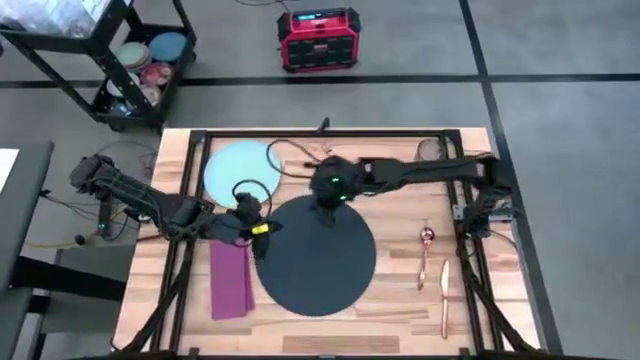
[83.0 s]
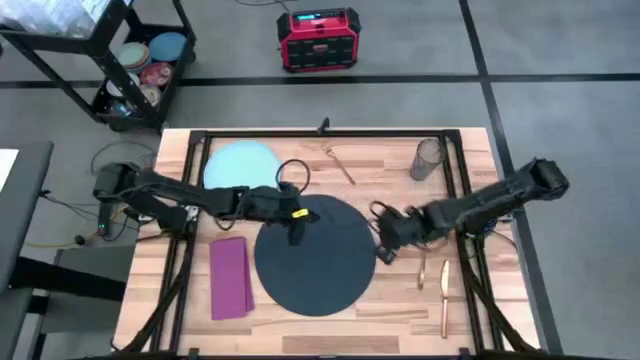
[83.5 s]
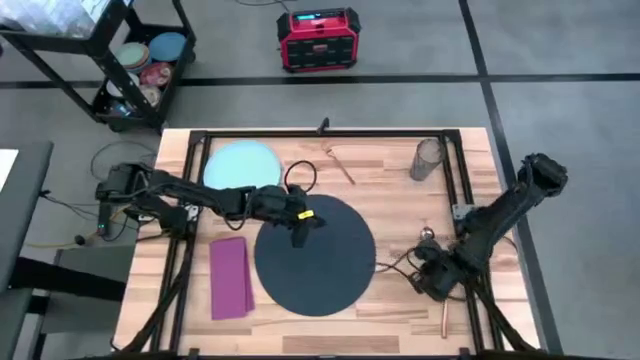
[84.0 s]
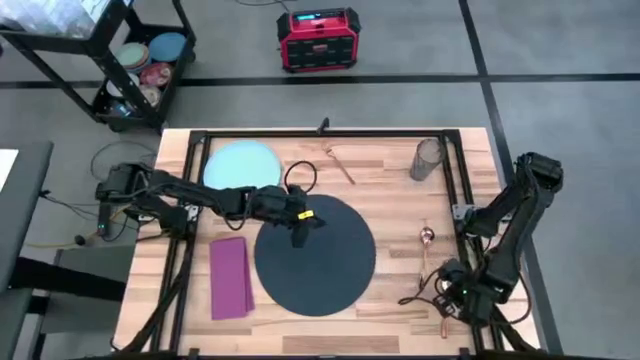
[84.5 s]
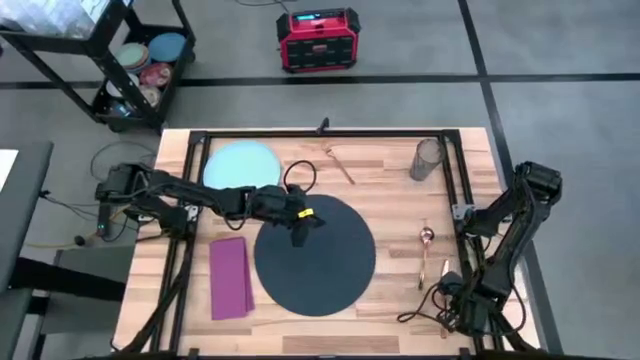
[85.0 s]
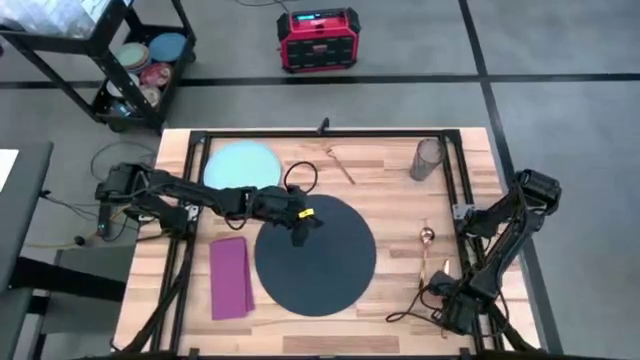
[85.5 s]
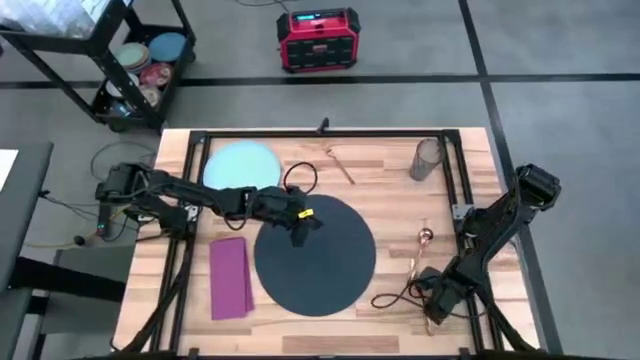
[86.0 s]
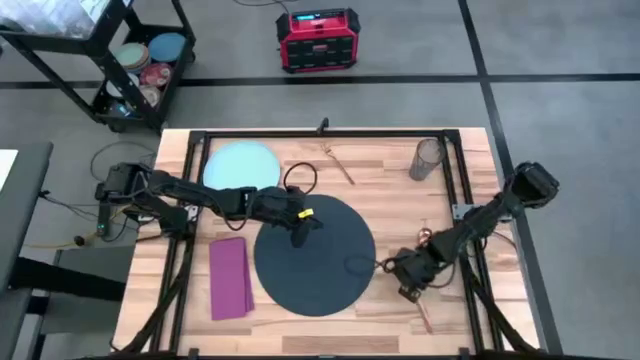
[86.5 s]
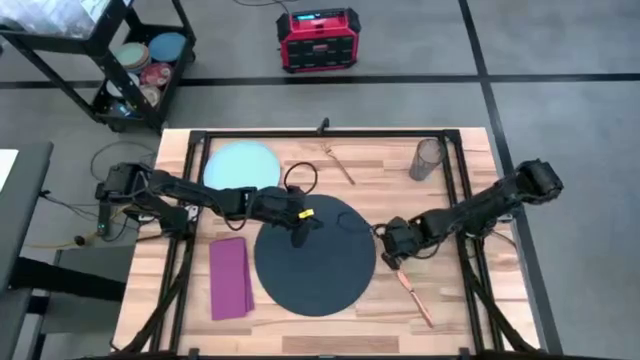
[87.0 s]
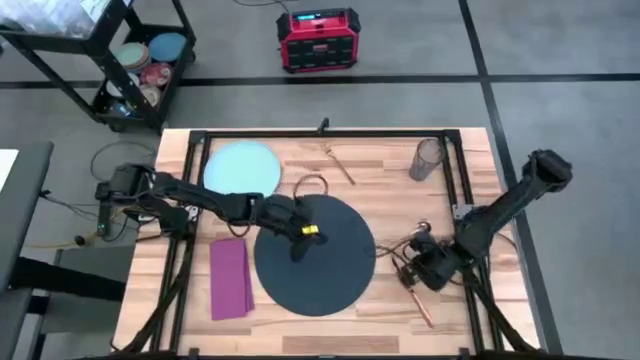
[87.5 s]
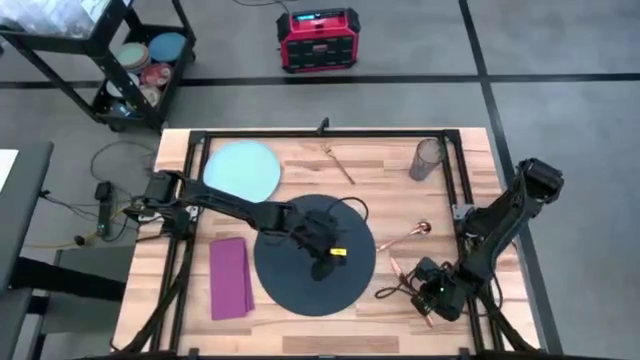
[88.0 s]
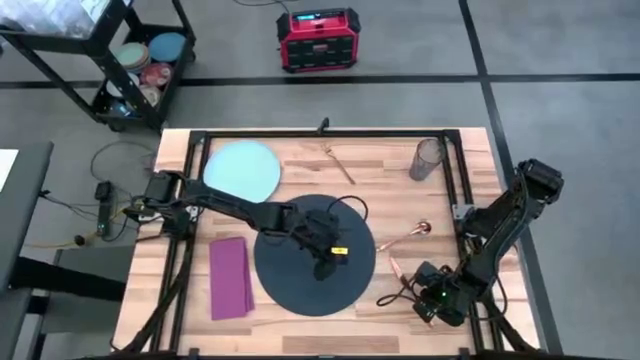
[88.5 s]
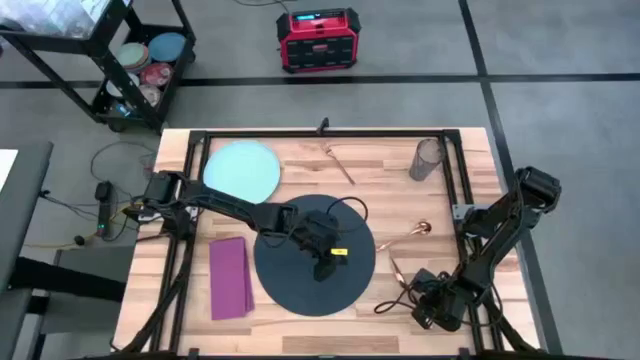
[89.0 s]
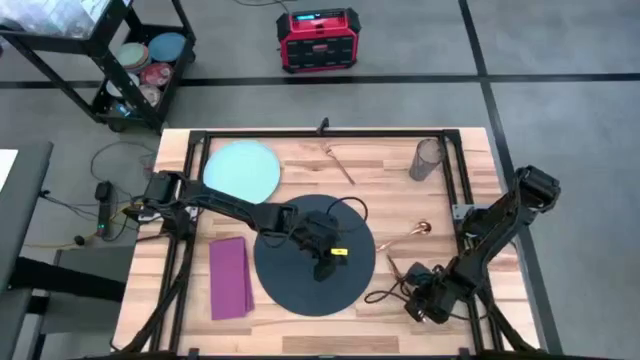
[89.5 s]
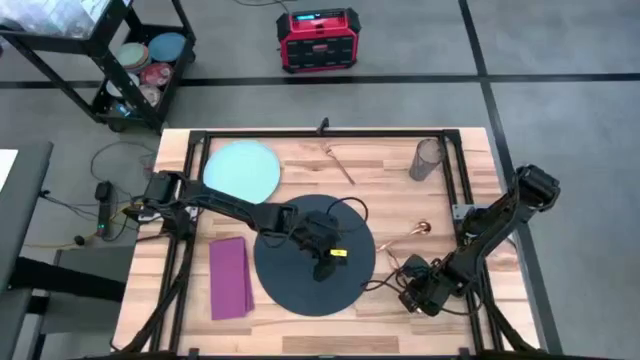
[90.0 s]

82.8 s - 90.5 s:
Task: Set table place
Move the brown table knife to the right of the blue table mat

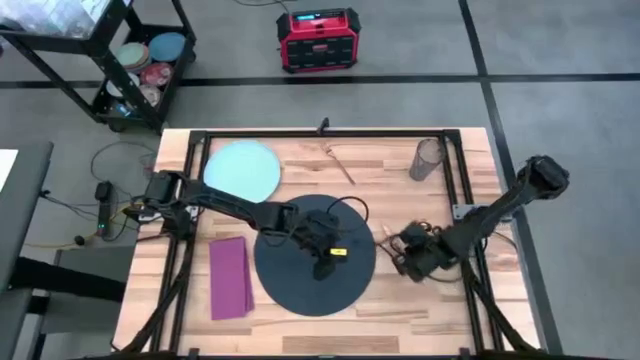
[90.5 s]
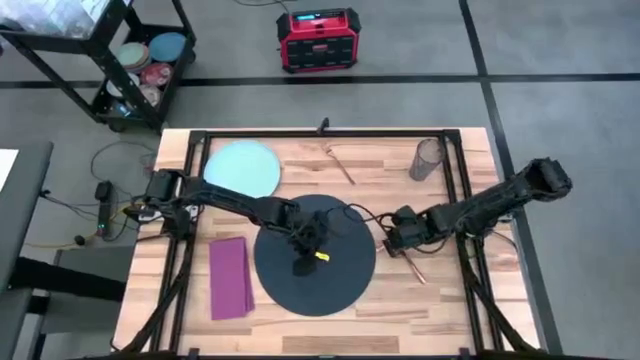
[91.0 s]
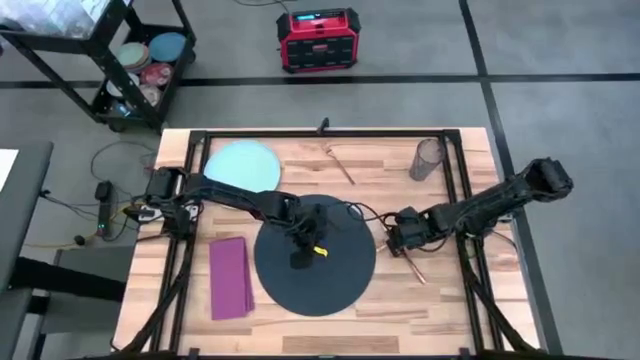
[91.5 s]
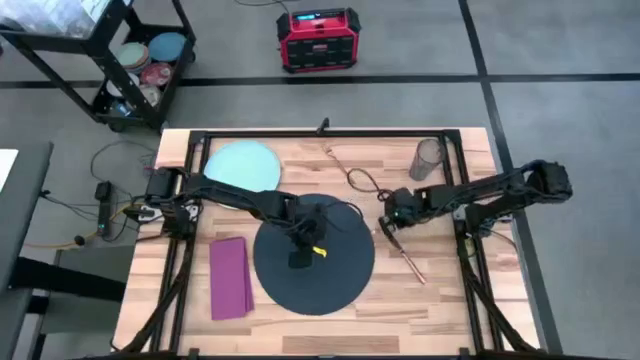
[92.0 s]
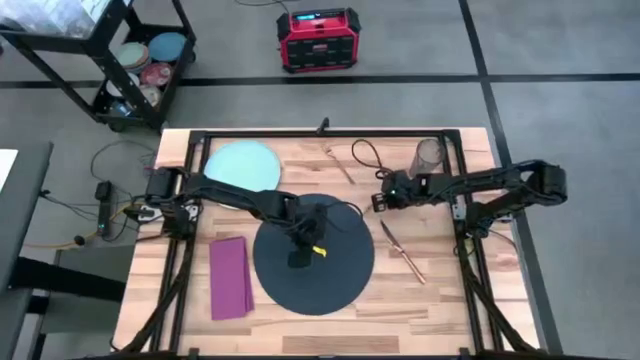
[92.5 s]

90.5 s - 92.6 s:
Move the brown spoon to the top right of the blue table mat

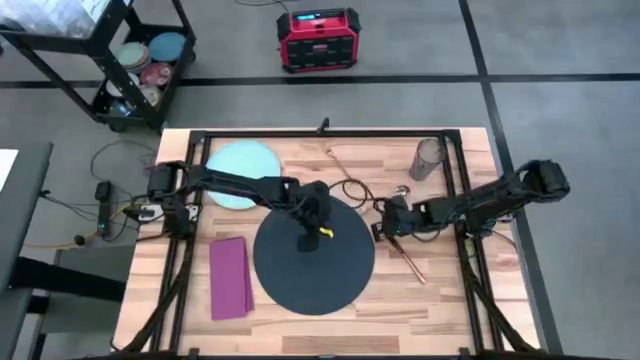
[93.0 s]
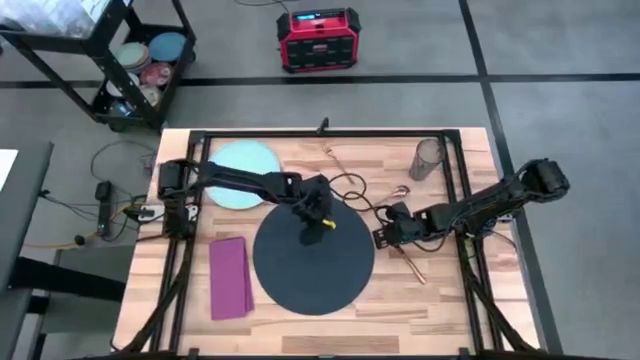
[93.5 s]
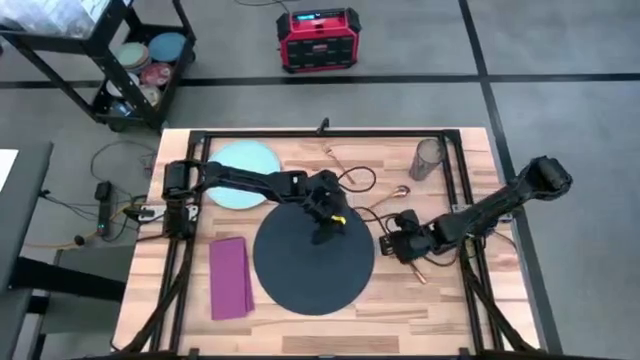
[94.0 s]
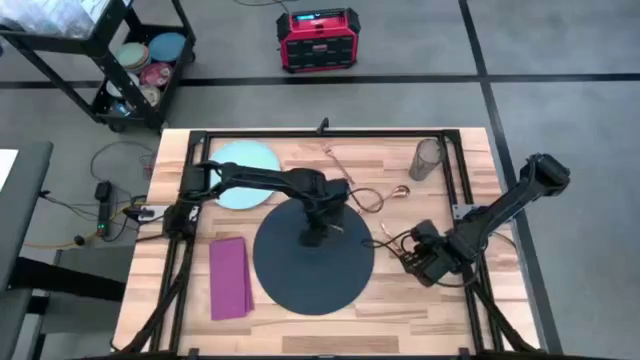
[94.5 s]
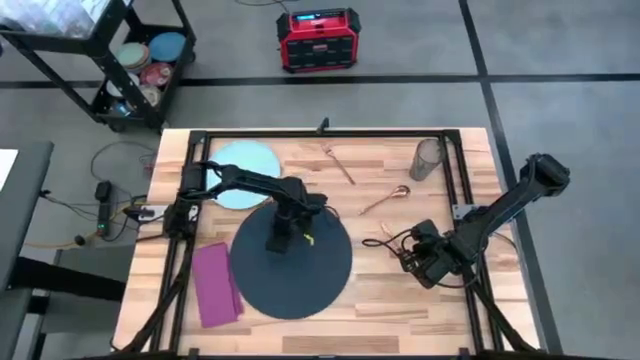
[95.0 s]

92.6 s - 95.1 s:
Adjust the blue table mat on the table

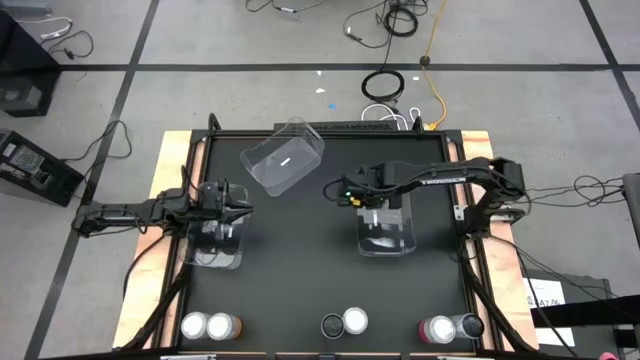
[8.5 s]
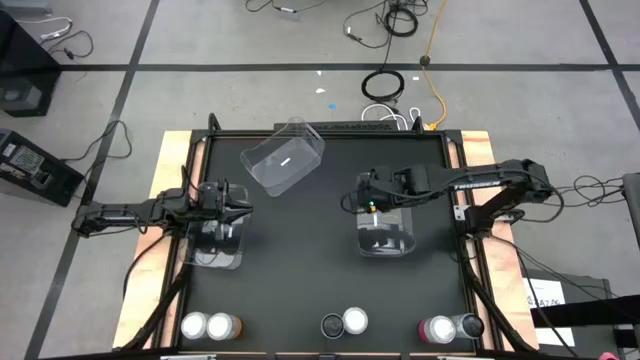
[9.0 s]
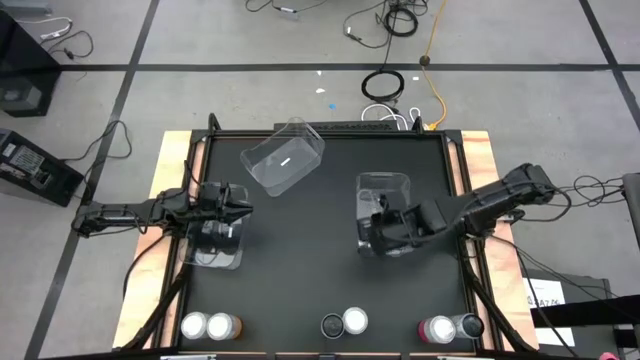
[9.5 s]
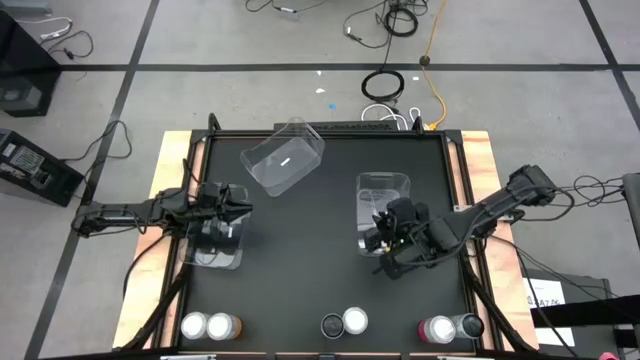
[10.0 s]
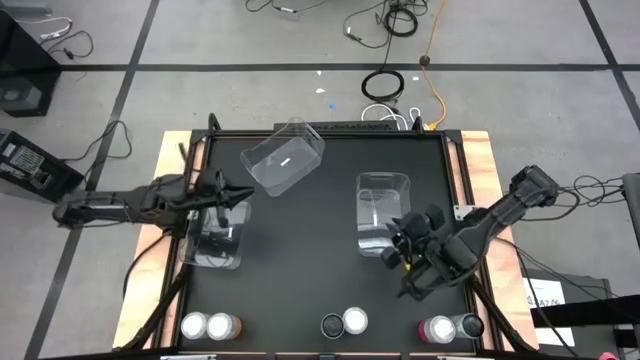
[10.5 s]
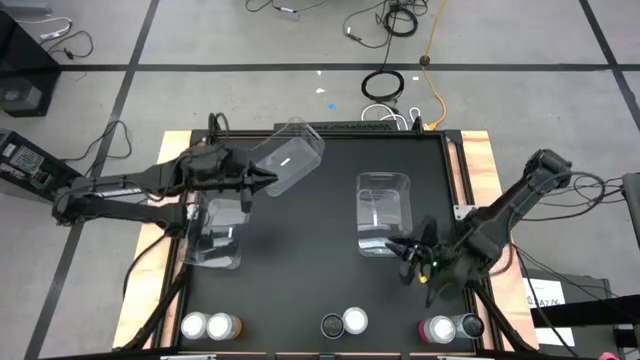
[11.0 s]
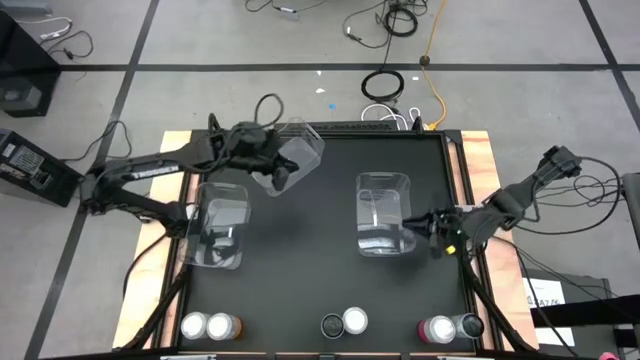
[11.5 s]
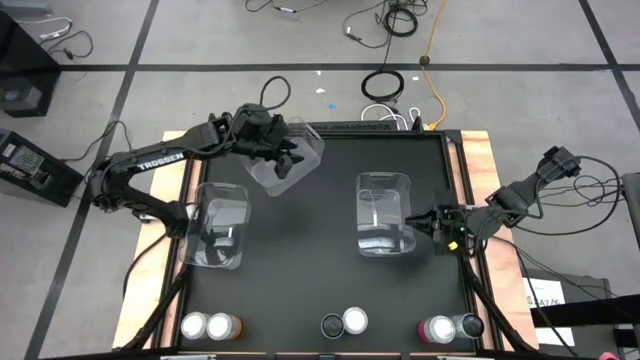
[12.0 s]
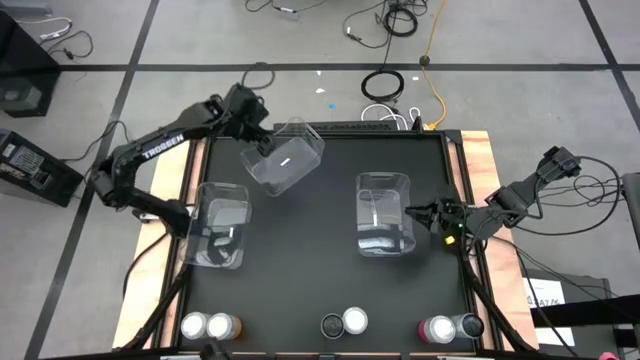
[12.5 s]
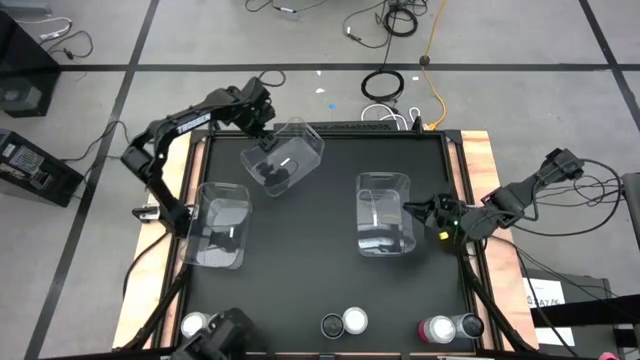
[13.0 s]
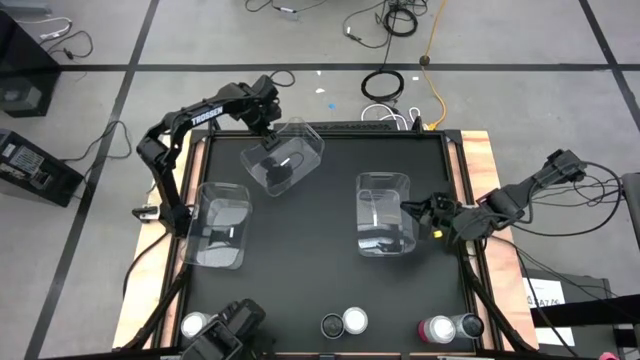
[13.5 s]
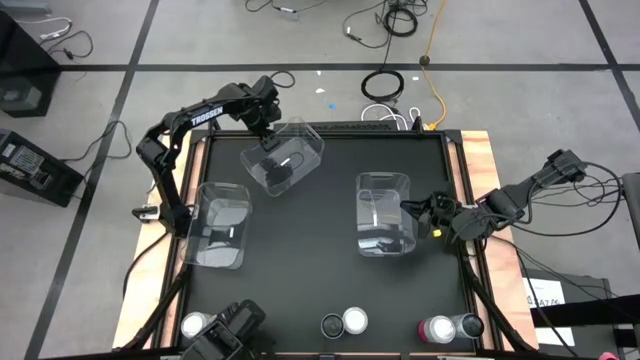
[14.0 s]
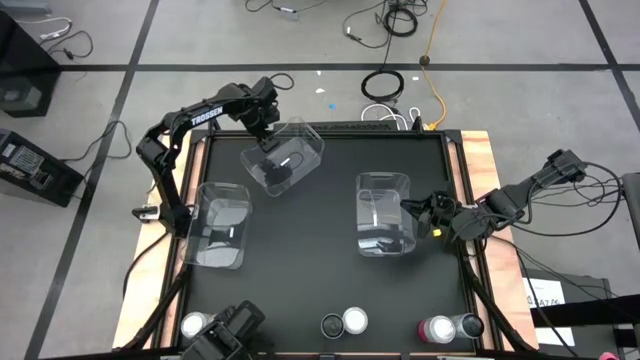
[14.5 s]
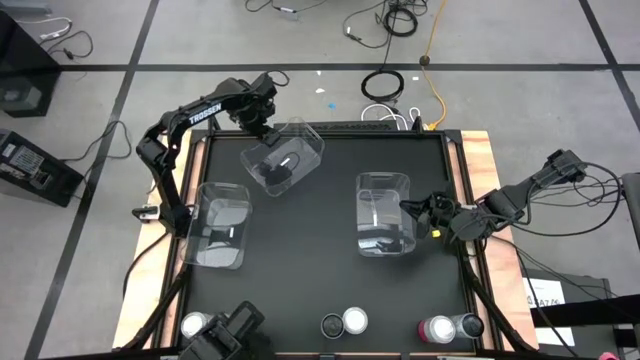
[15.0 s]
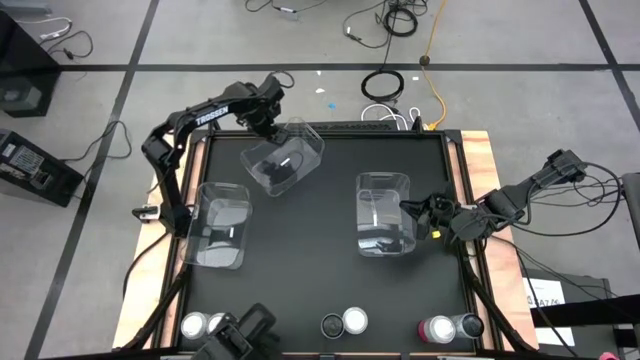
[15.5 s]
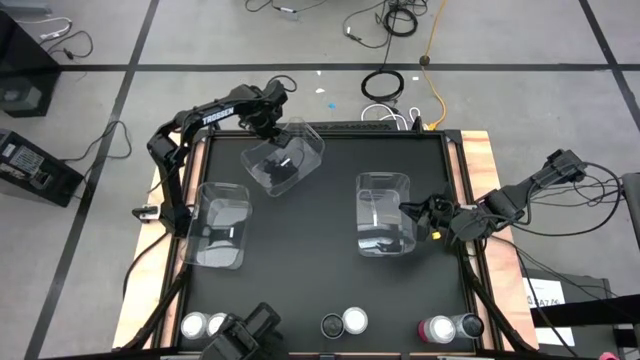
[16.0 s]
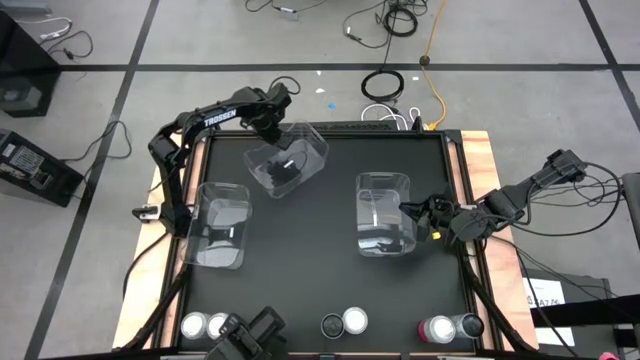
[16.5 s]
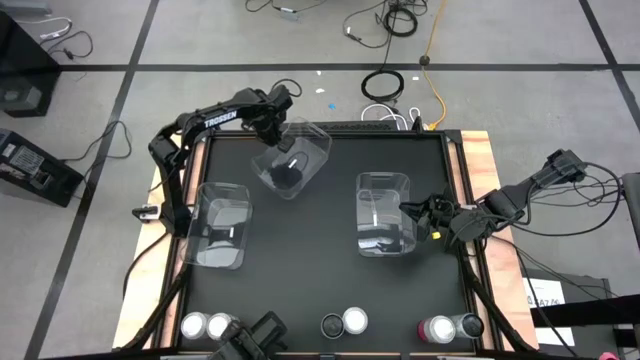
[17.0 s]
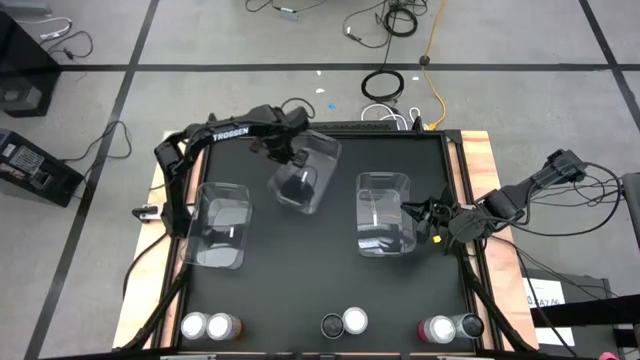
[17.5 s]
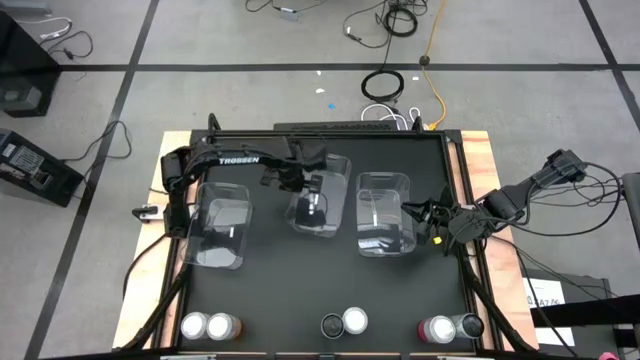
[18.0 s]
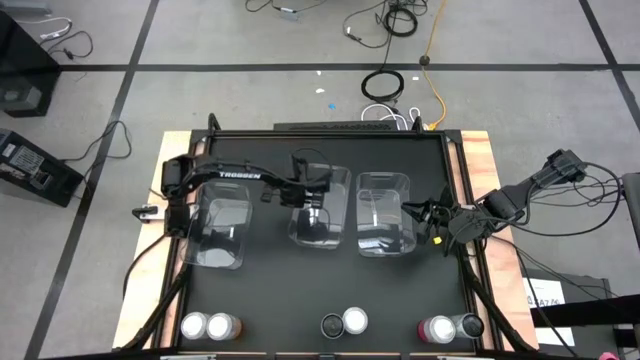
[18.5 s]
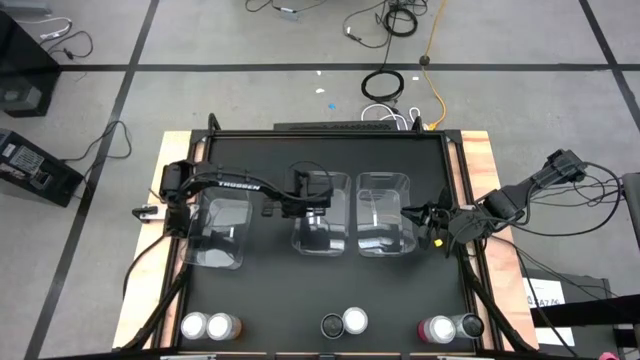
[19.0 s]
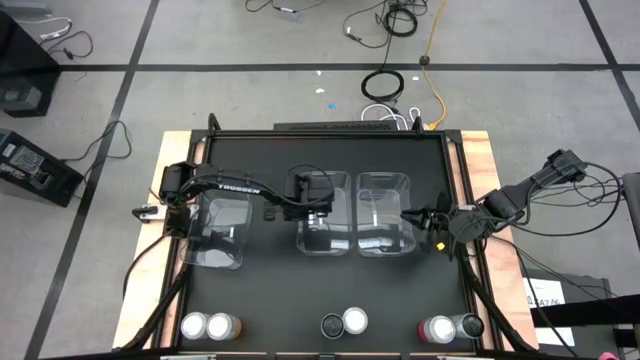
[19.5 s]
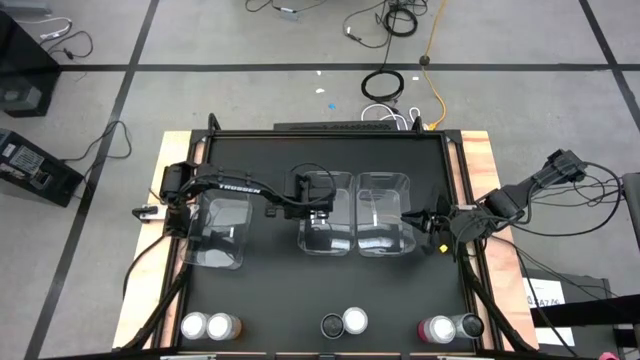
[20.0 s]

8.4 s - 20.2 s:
Task: Sort soda cans
Move the top left transparent bin to the center of the table
